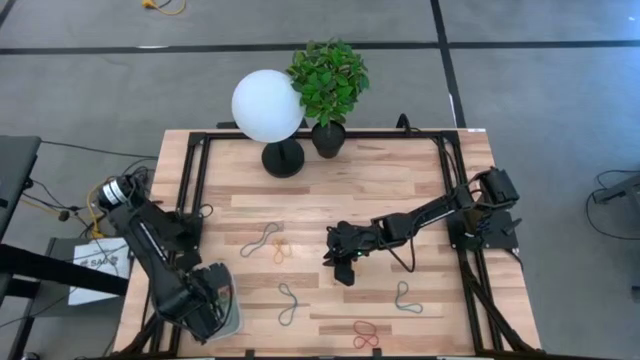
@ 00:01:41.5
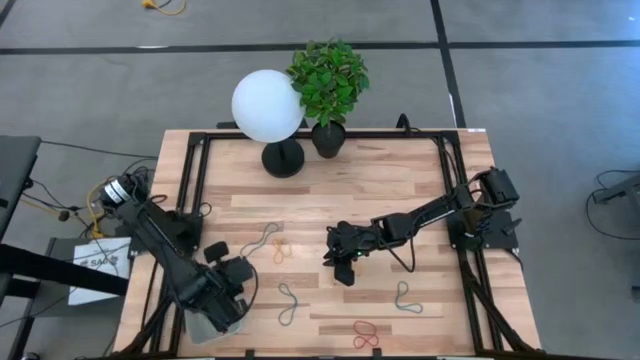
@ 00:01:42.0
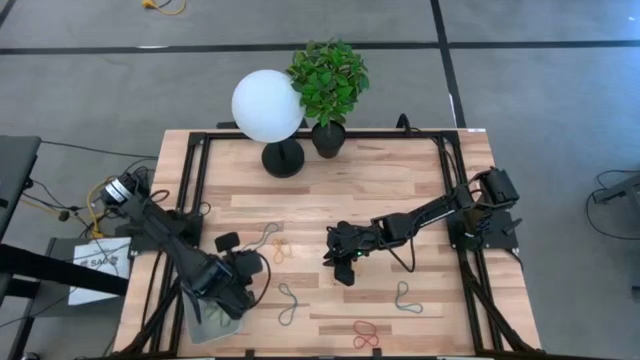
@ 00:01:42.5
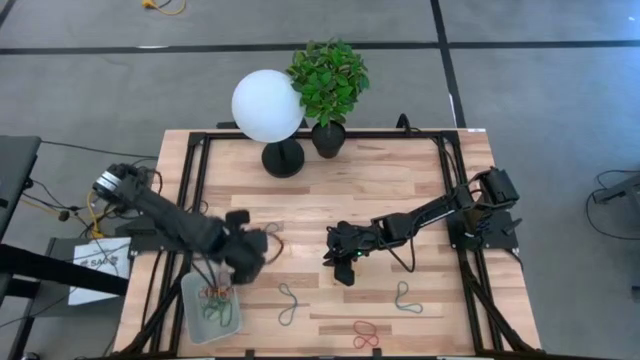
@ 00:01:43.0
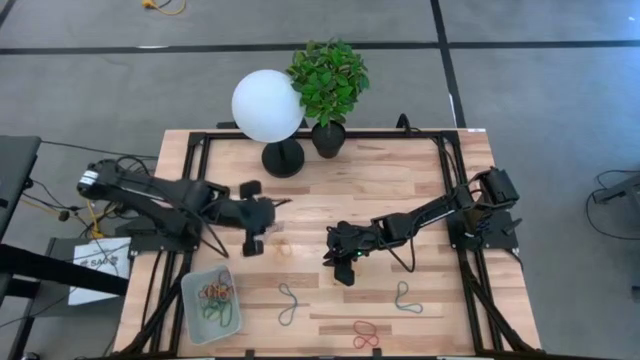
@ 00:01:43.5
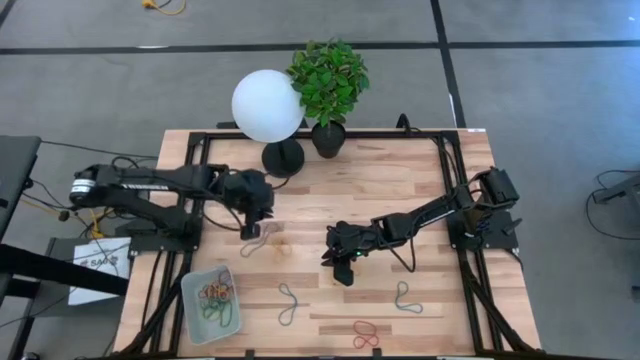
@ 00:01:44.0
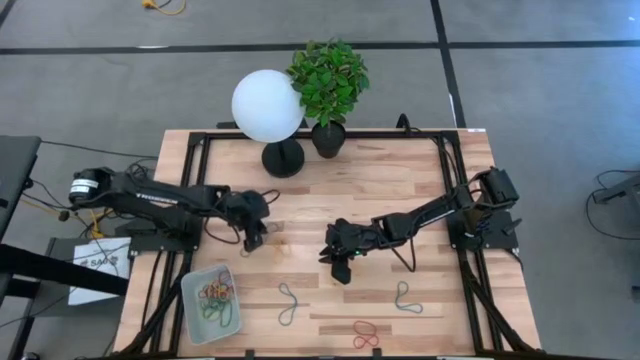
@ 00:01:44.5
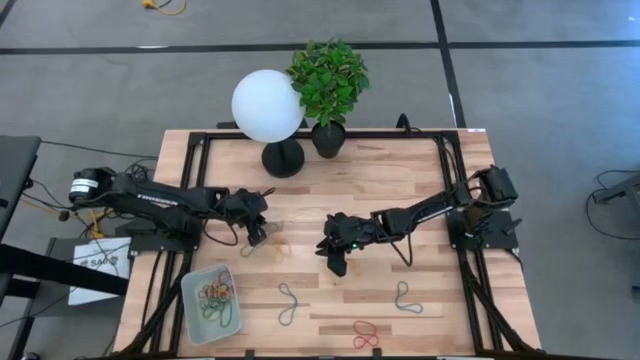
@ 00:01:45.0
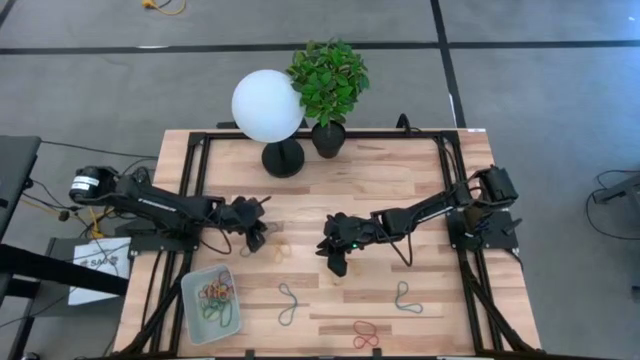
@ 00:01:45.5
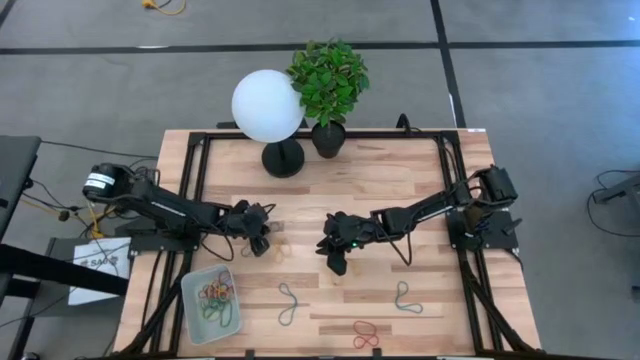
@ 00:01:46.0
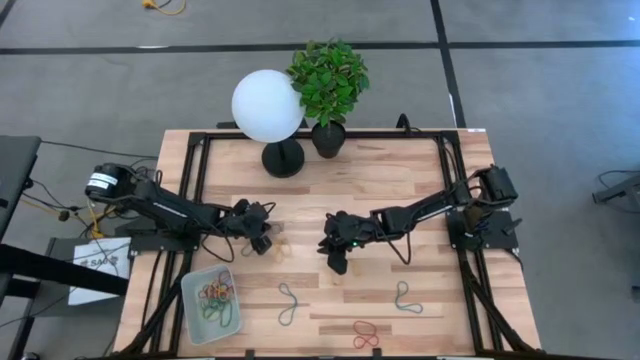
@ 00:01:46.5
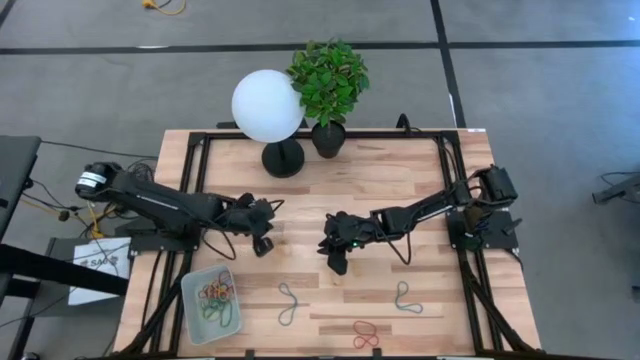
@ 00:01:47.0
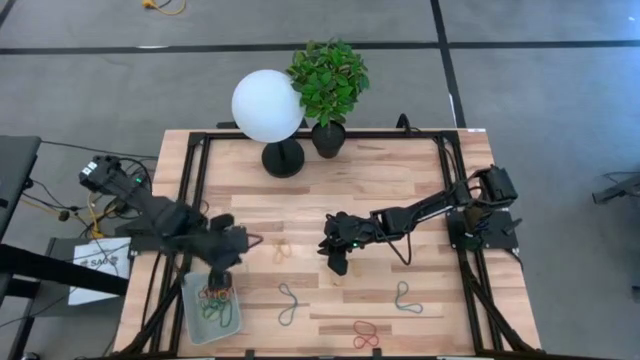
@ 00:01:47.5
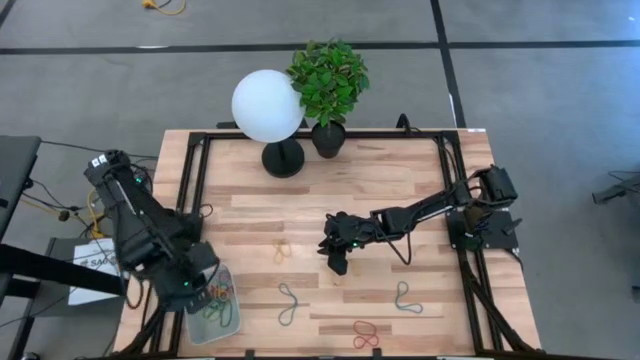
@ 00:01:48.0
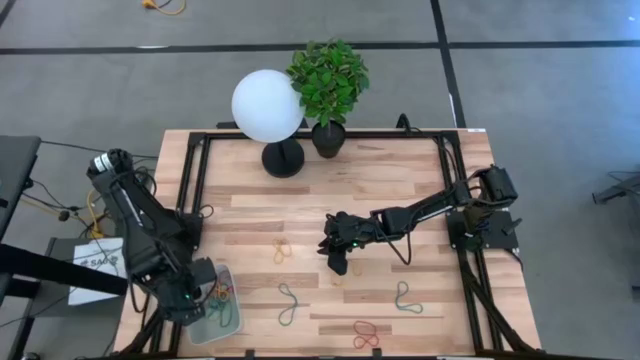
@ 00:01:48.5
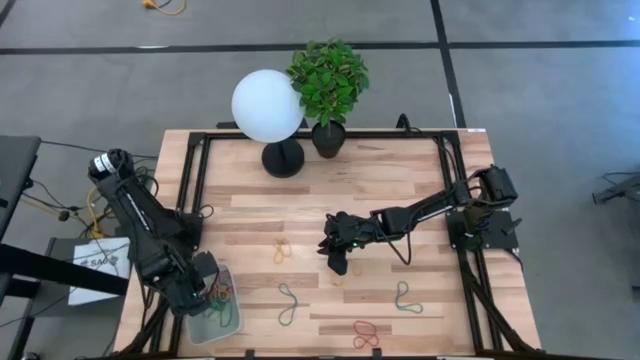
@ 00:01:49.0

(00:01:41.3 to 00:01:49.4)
Task: Pick and place items into bin
Put the blue rubber band into the gray bin

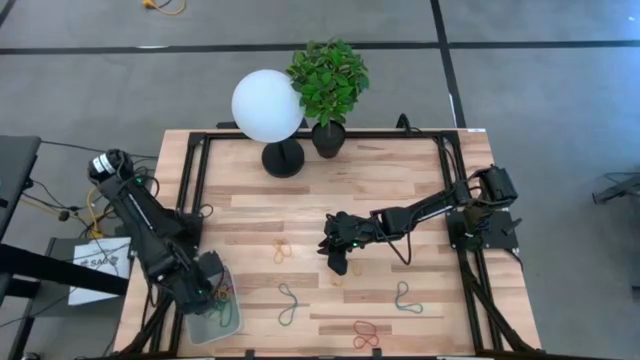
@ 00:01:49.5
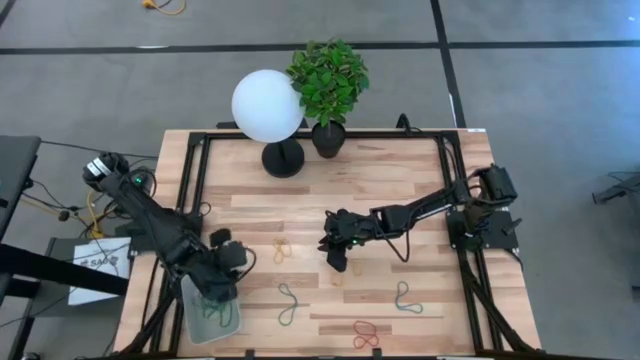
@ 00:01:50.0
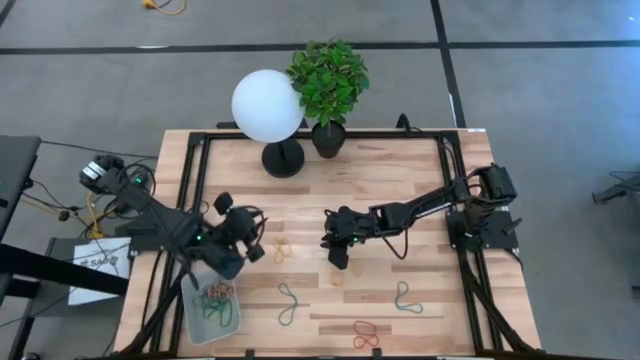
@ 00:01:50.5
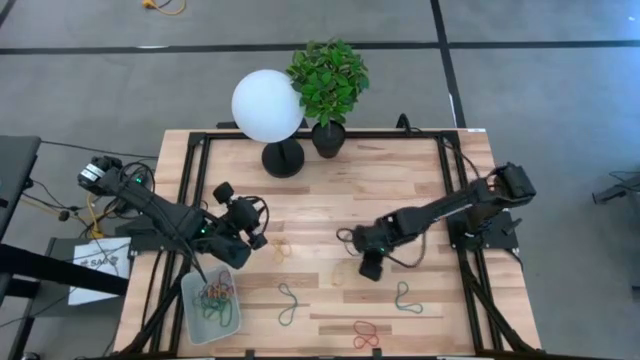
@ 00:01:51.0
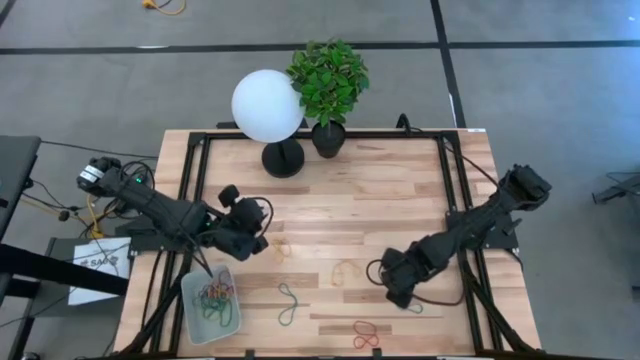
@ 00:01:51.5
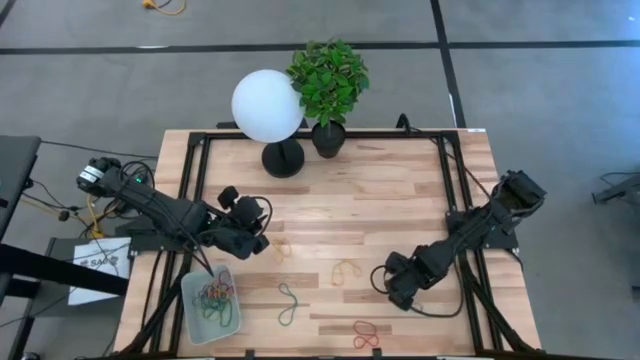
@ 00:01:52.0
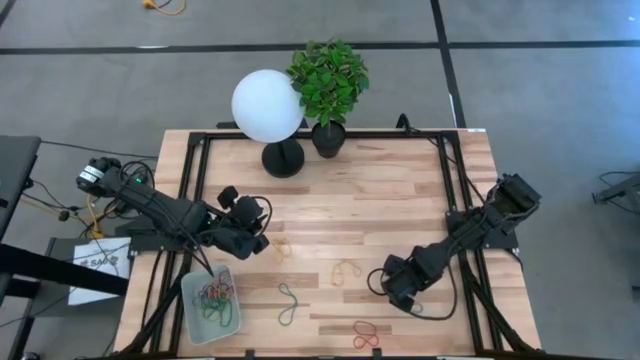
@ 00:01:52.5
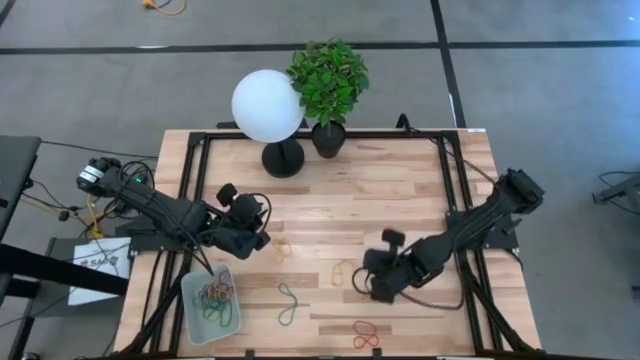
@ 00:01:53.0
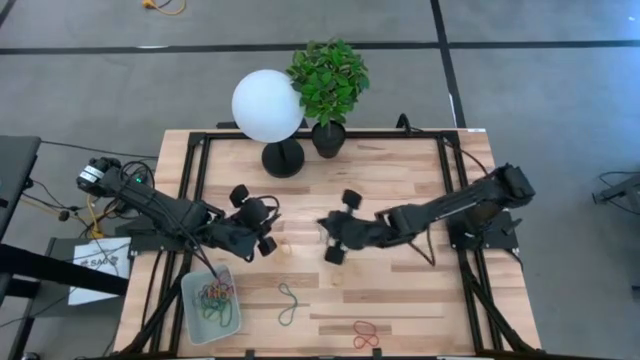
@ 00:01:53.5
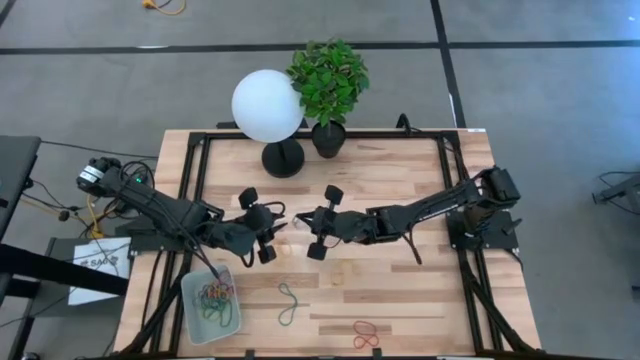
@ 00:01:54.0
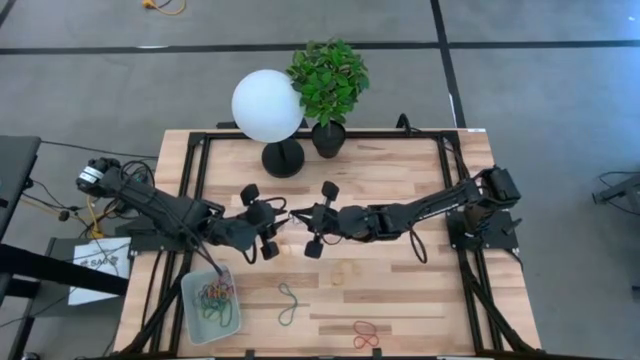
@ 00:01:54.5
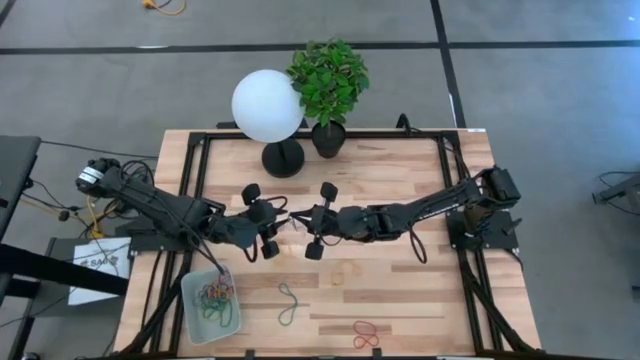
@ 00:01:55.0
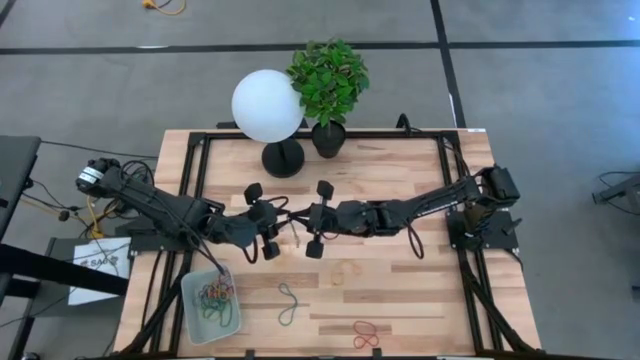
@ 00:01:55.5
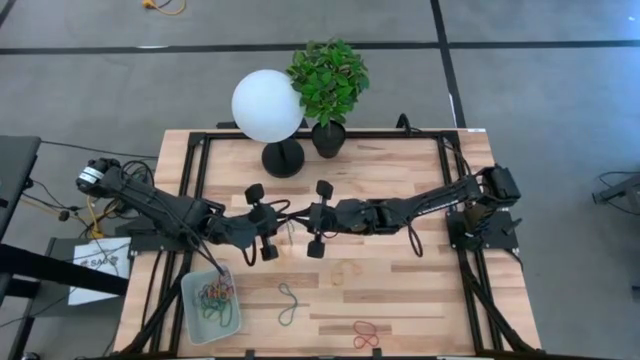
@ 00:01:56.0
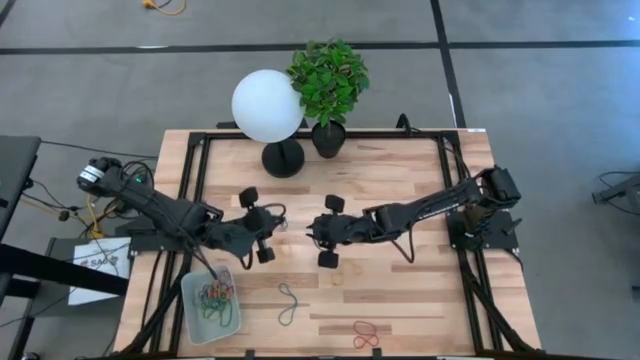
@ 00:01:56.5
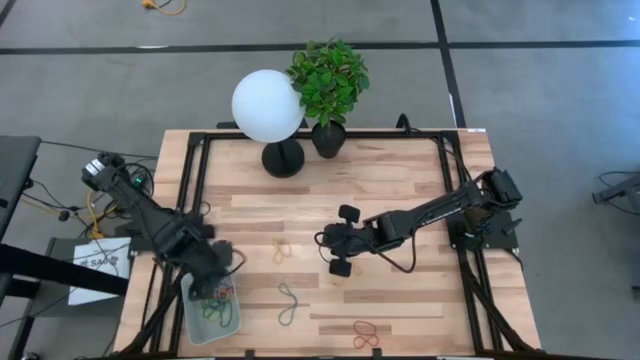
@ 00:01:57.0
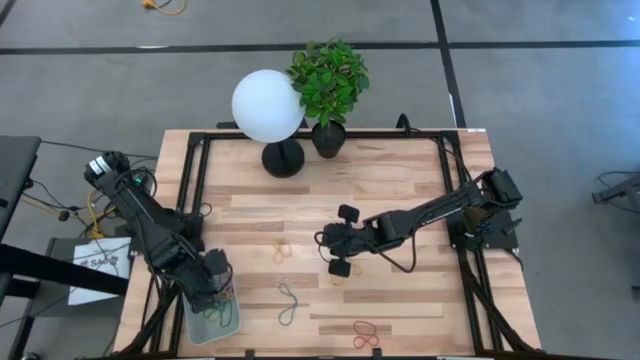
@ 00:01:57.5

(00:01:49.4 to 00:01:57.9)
Put the blue rubber band into the gray bin

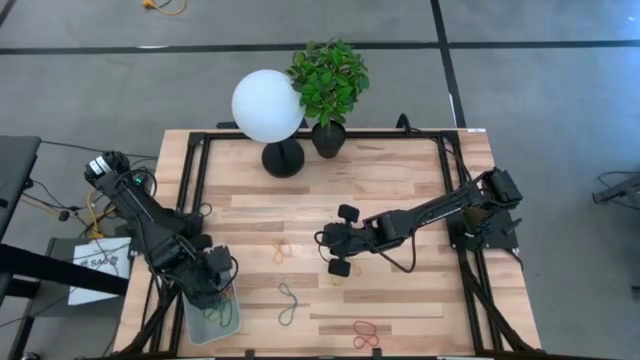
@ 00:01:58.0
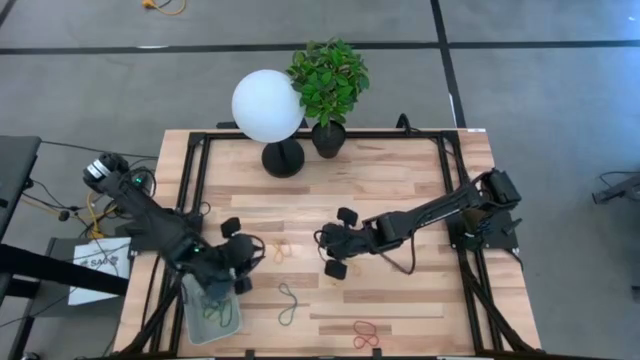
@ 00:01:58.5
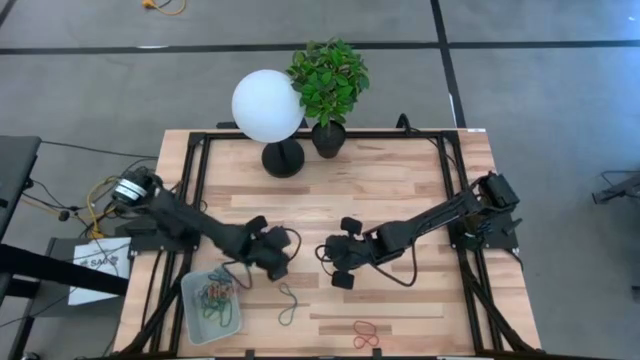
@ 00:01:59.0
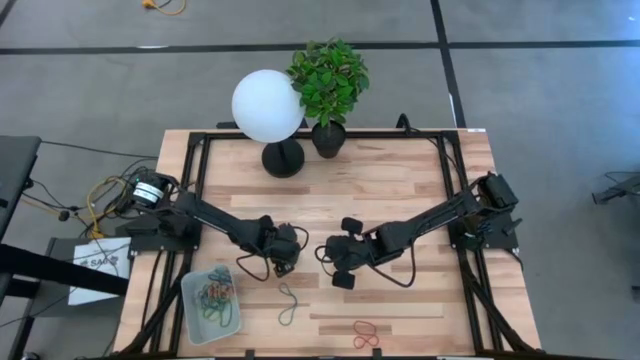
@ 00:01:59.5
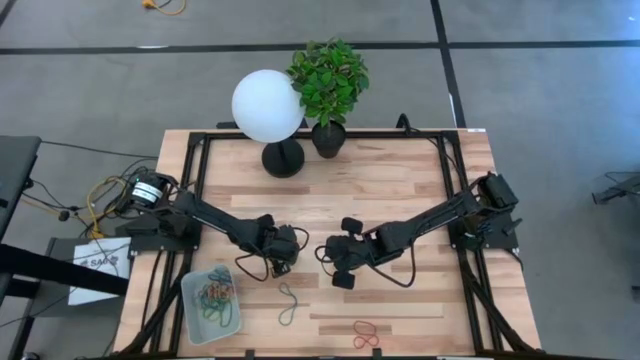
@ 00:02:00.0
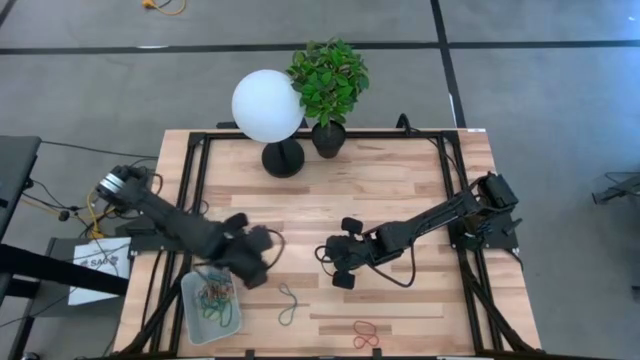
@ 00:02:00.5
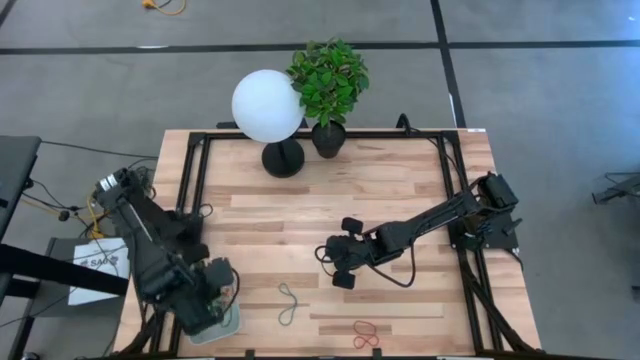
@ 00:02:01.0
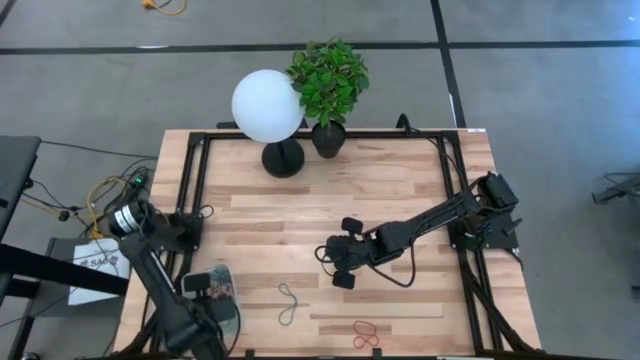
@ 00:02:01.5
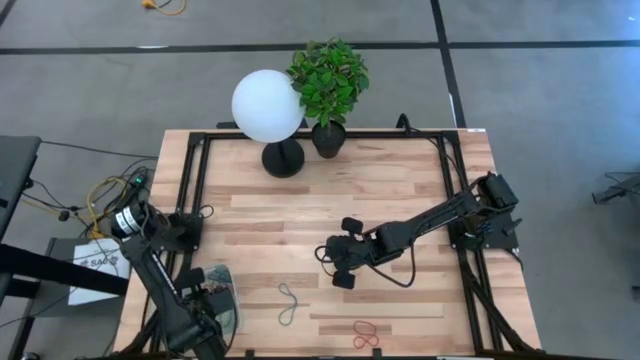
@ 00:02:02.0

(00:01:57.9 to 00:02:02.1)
Put the yellow rubber band into the gray bin
